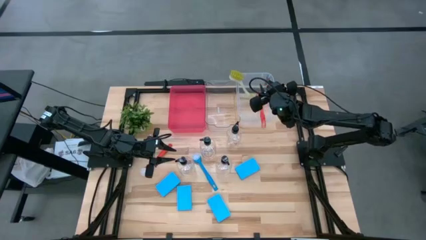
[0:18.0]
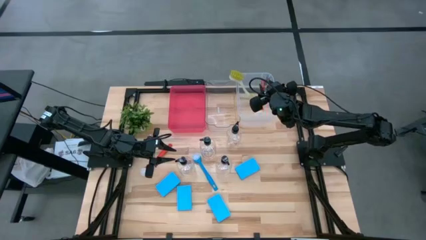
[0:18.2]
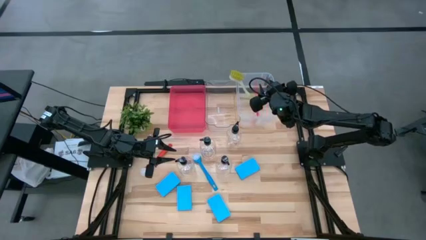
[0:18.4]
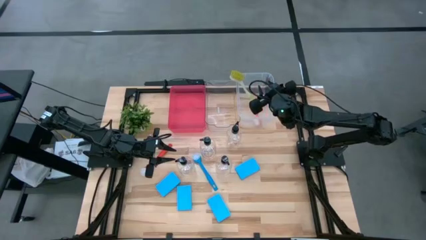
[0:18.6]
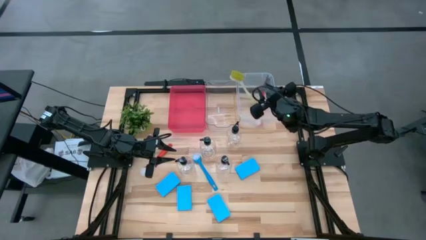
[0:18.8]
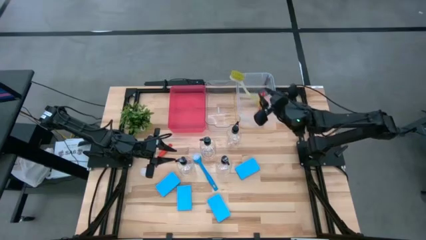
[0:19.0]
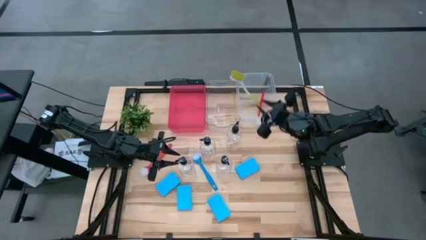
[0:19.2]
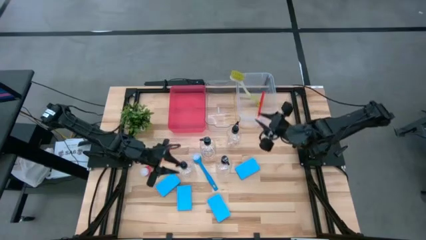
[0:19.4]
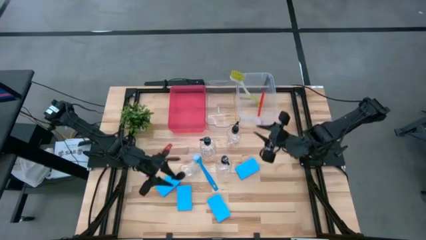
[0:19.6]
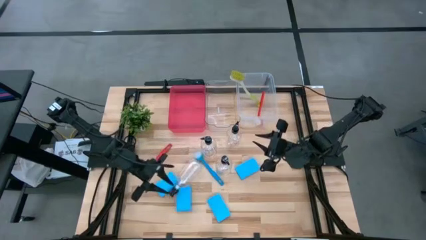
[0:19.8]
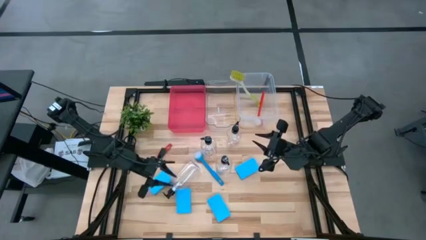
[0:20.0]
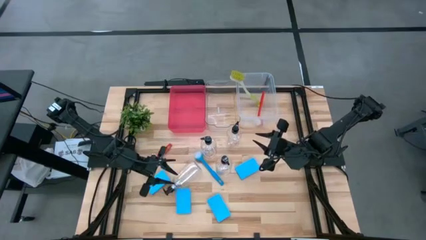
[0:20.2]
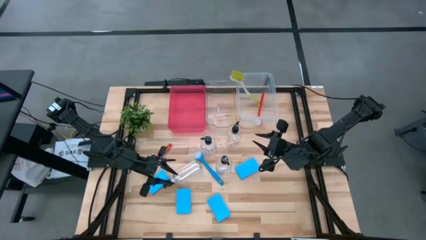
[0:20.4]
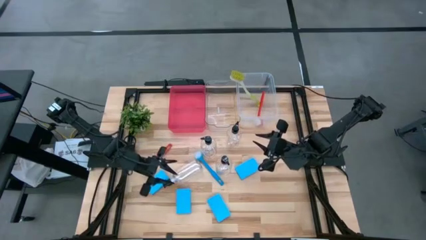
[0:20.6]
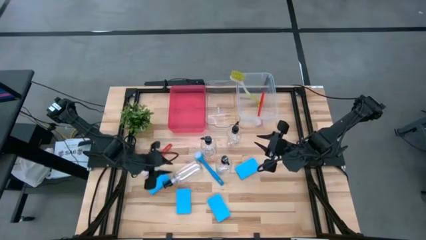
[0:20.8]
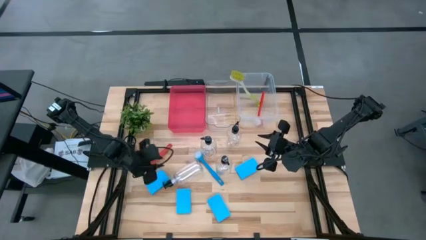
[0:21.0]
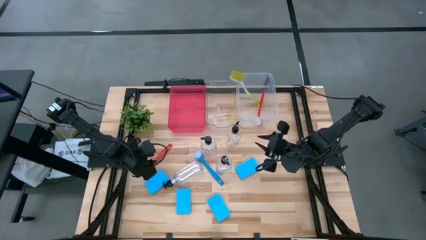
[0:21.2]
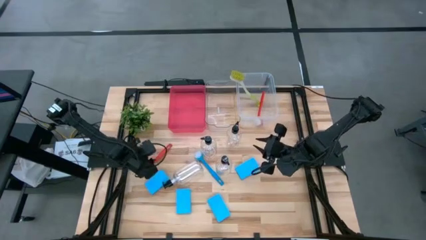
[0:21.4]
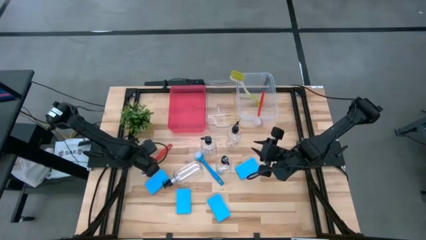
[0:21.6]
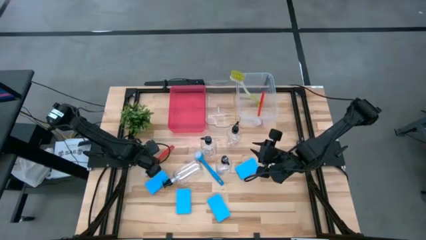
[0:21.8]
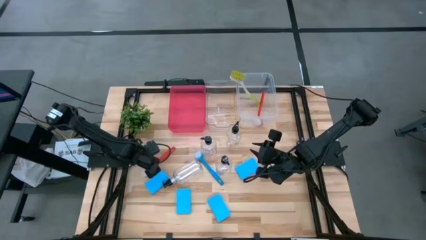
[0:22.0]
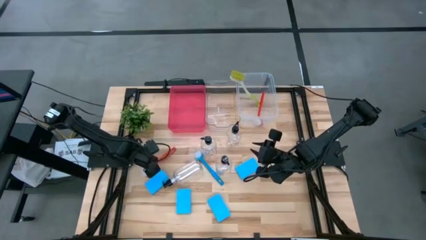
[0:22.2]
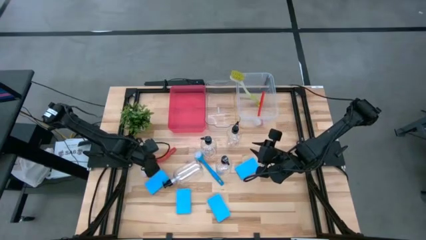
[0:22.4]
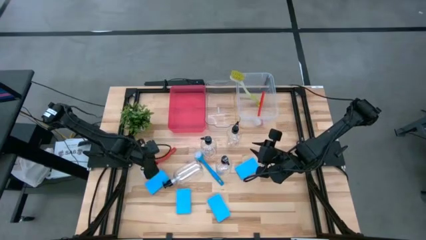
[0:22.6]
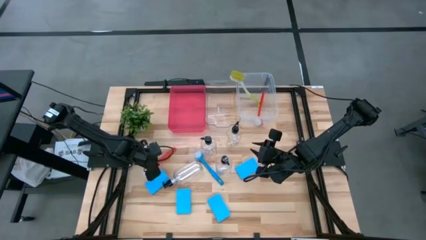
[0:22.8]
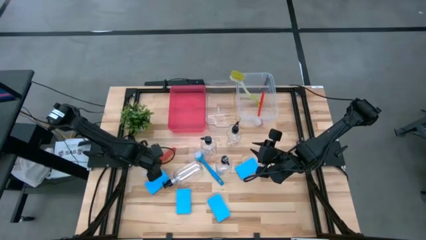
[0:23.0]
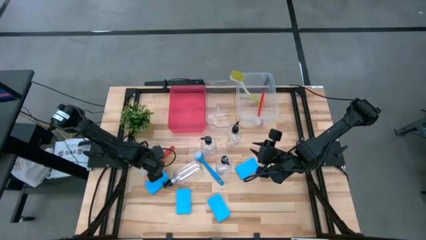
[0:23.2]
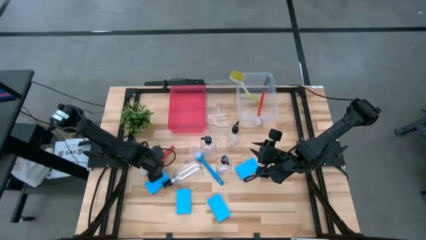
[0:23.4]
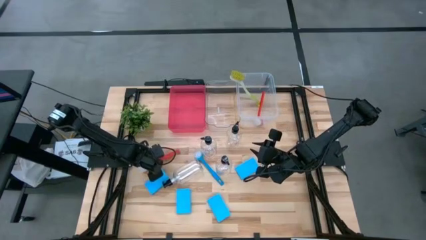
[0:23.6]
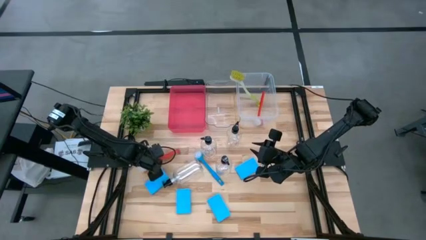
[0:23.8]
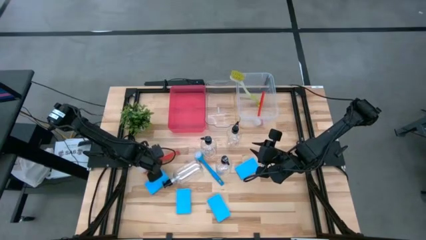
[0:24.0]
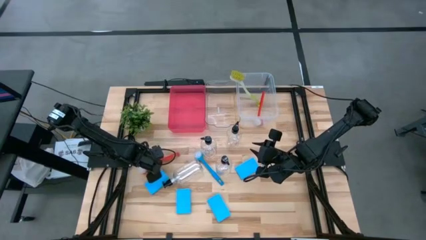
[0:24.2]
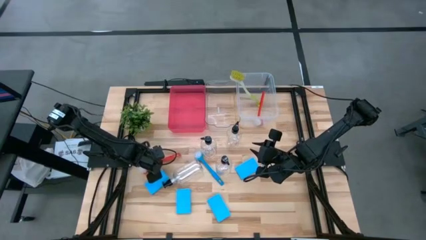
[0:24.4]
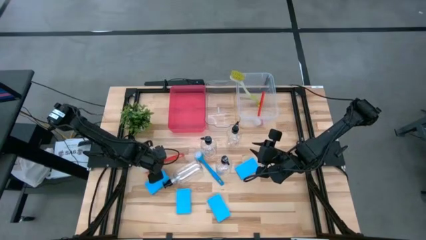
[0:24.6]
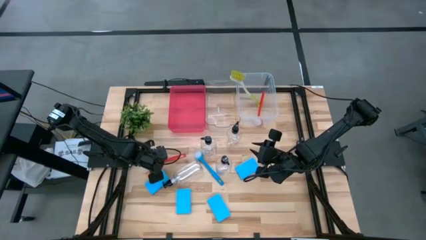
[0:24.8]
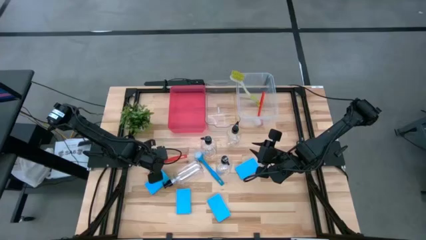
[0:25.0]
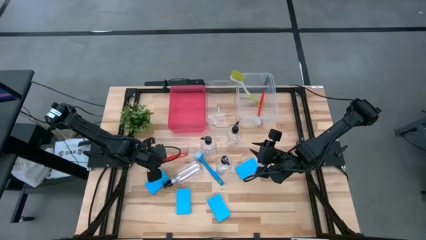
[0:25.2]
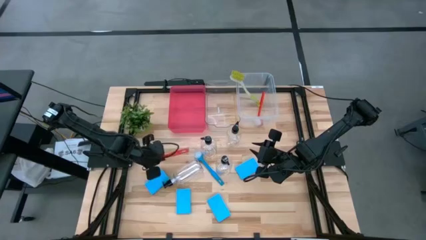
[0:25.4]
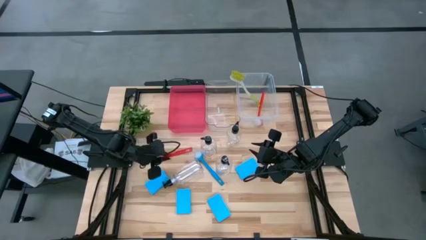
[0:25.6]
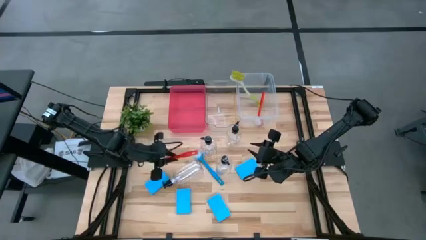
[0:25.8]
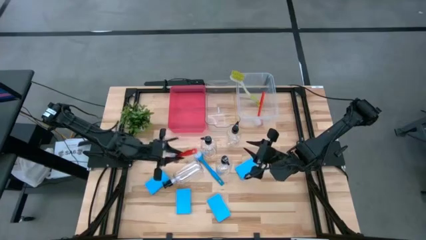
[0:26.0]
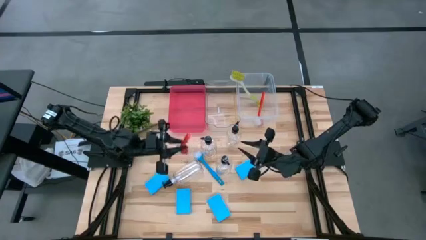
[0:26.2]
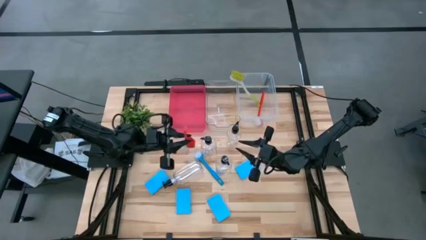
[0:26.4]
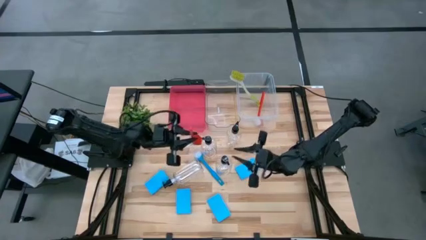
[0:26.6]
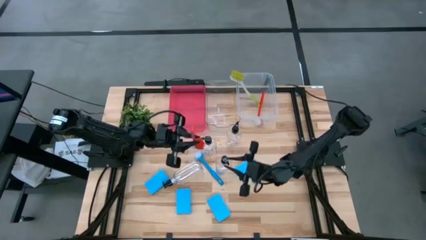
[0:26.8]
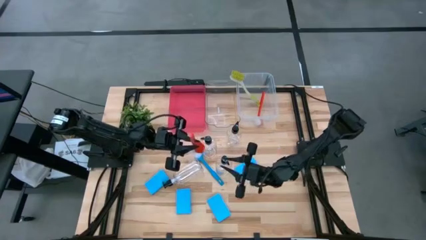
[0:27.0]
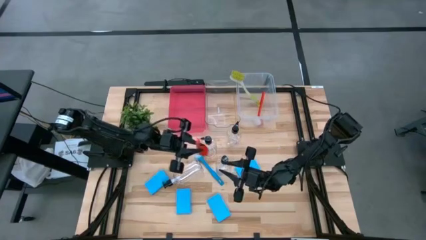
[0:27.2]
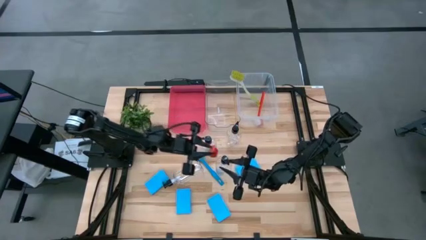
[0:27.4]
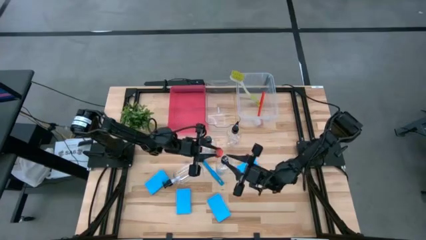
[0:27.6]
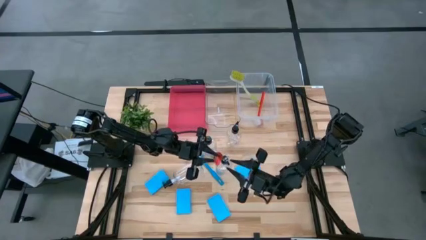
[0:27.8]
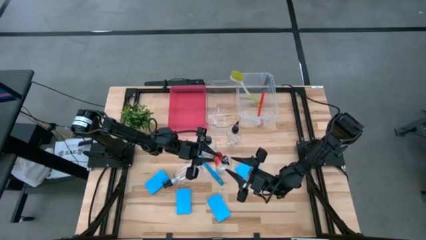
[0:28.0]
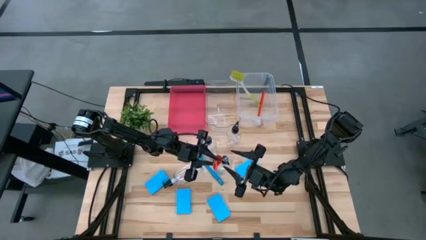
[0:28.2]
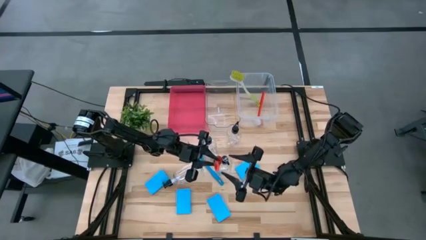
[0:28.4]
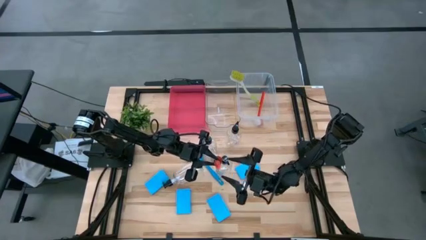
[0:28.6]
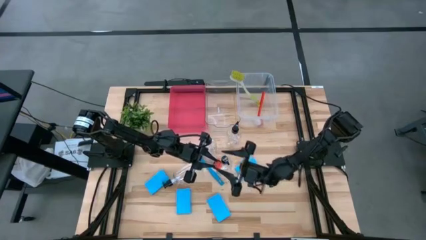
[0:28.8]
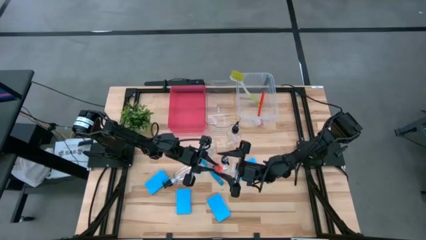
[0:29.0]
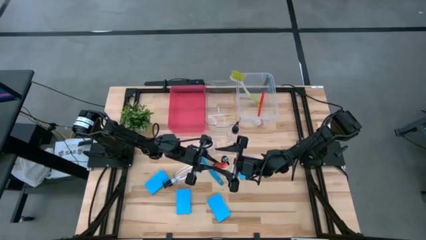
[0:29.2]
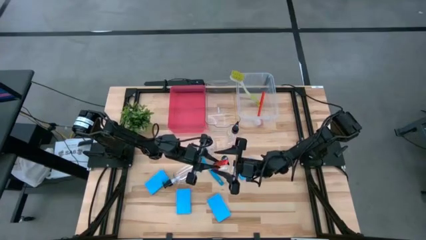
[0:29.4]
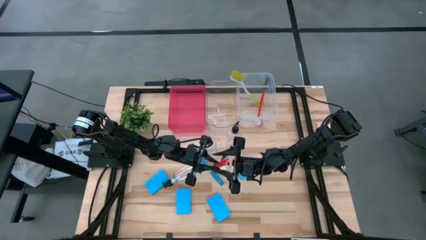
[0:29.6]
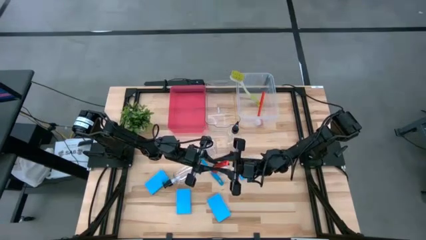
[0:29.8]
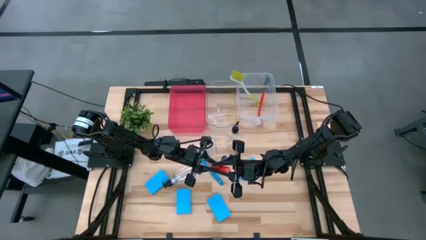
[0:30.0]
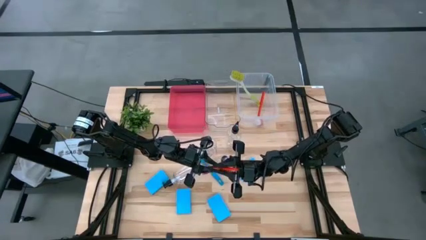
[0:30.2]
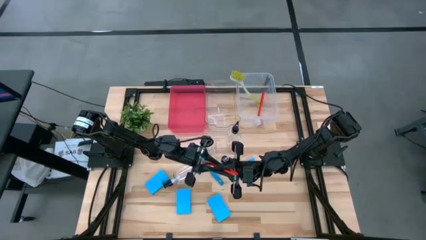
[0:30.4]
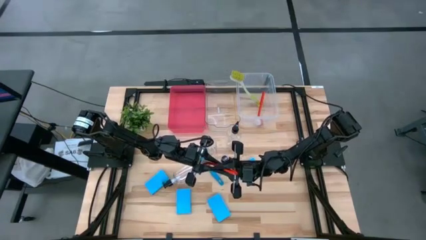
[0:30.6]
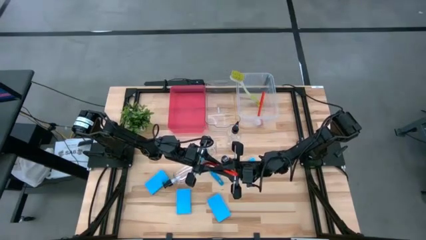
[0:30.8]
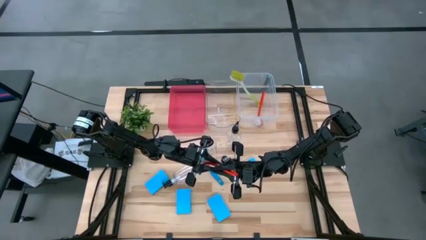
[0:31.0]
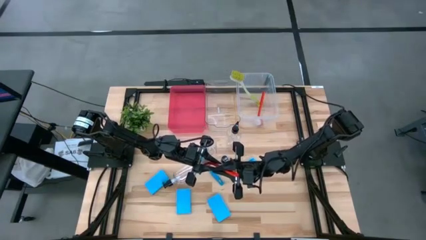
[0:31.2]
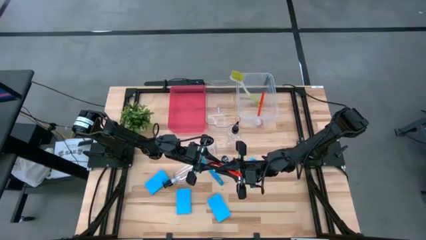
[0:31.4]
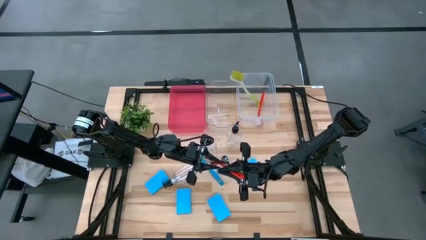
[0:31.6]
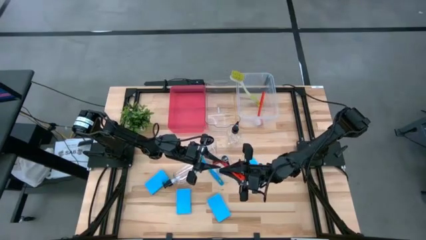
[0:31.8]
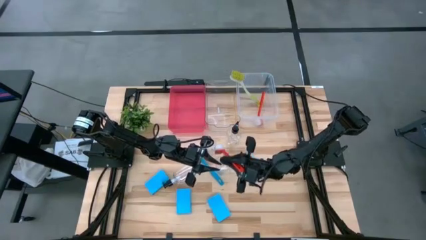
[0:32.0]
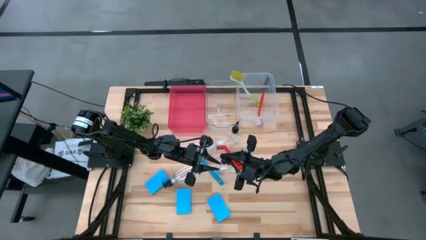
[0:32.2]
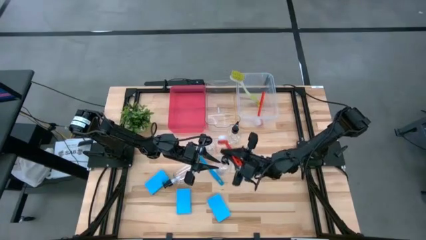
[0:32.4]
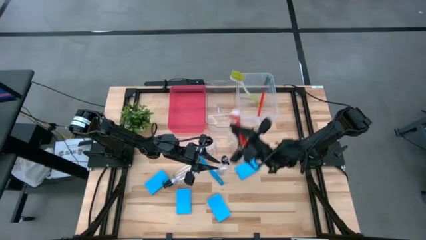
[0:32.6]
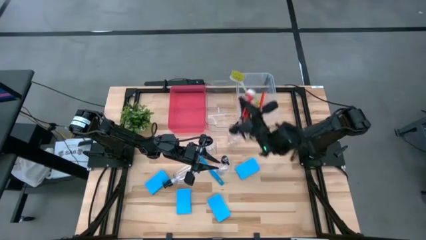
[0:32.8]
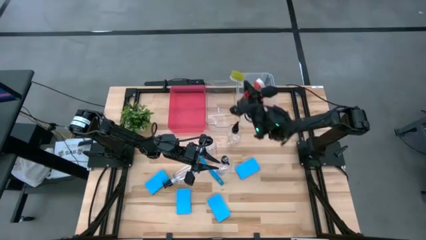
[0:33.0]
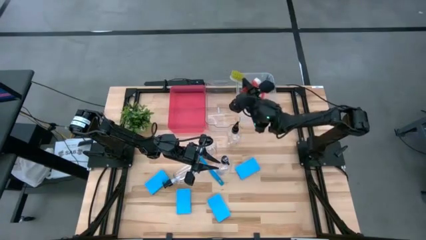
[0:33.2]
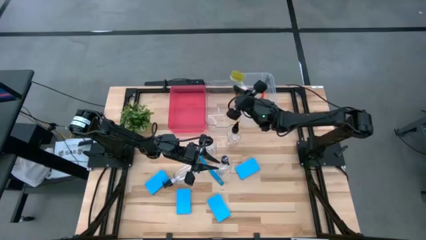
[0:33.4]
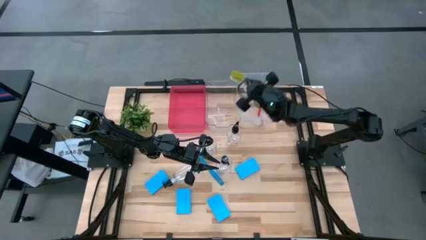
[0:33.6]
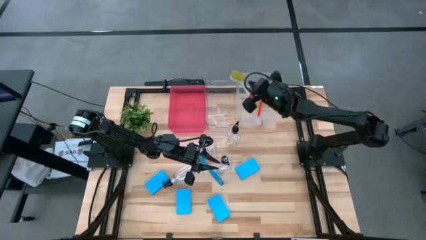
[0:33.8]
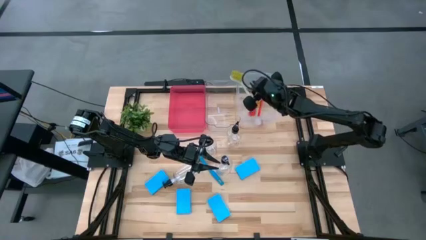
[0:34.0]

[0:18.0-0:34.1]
Task: Pick & Place Kitchen Sink Supplies
Put the orange kitchen brush into the white bin

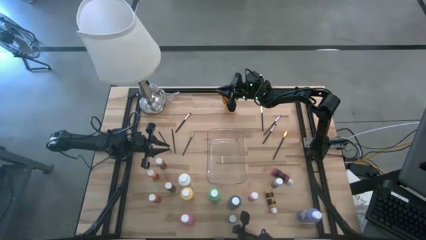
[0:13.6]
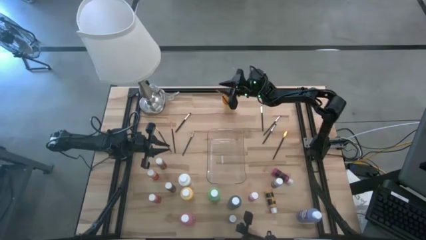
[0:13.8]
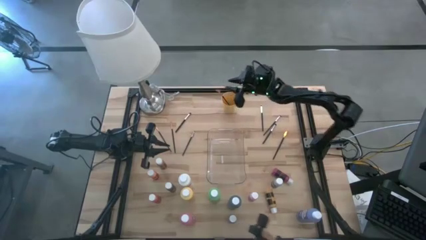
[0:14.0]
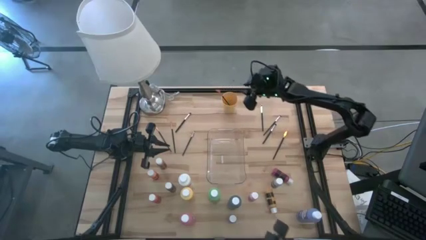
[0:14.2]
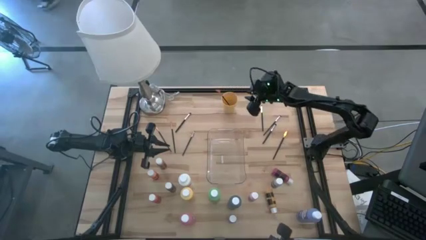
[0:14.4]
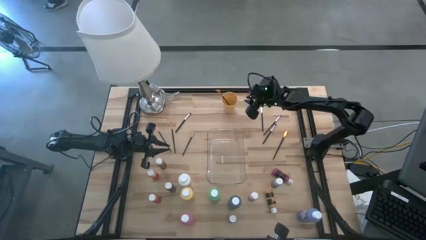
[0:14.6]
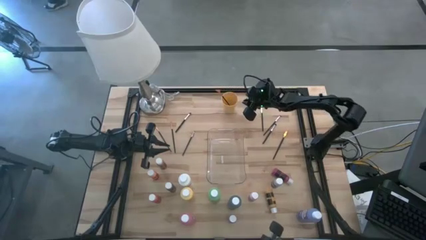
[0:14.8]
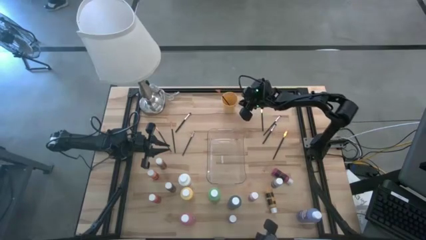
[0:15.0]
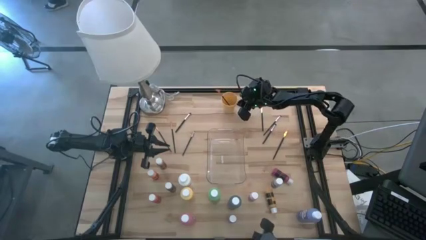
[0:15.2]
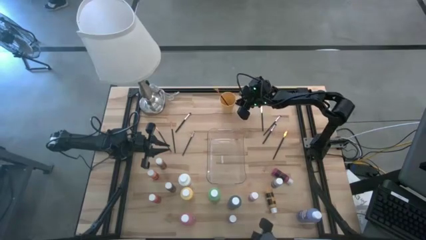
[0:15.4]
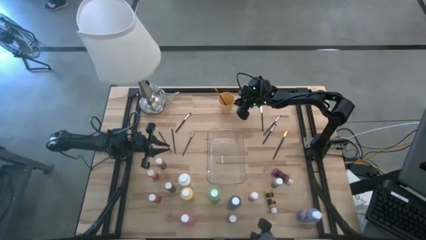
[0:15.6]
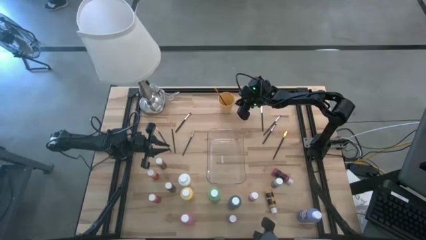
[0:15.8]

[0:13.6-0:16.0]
Task: Pick & Place Paint Supplies
Adjust the yellow cup
